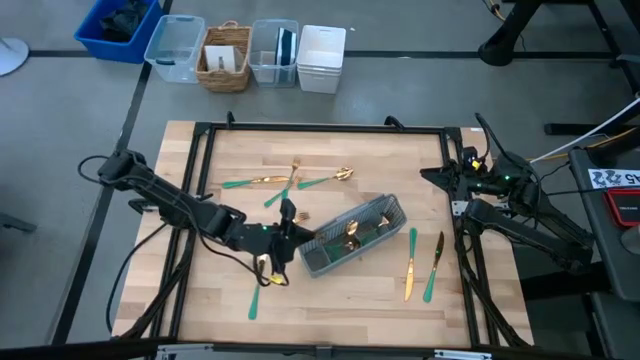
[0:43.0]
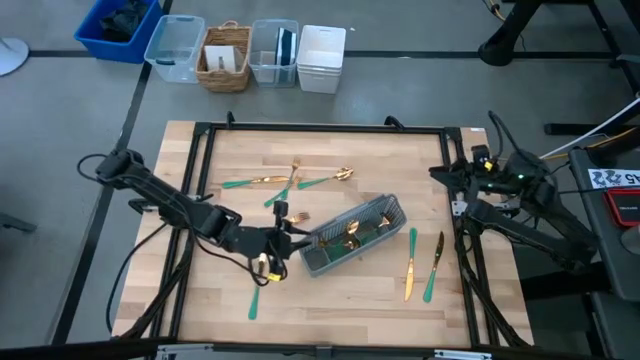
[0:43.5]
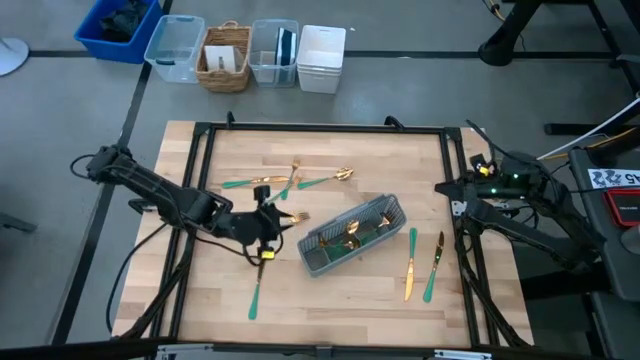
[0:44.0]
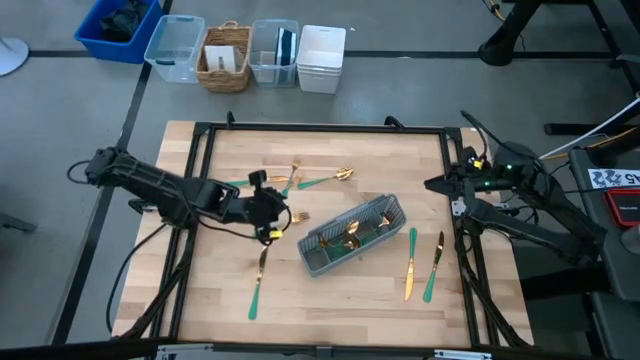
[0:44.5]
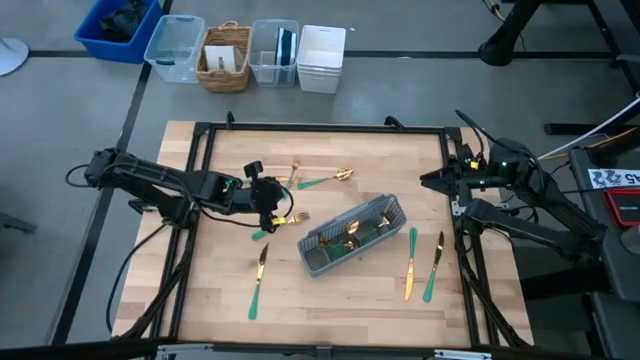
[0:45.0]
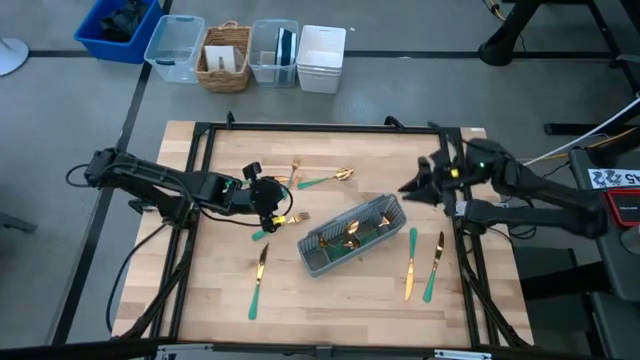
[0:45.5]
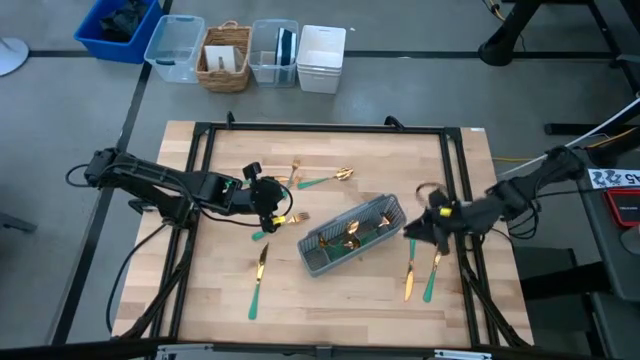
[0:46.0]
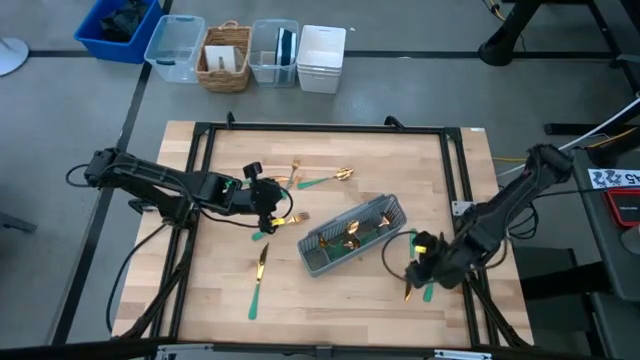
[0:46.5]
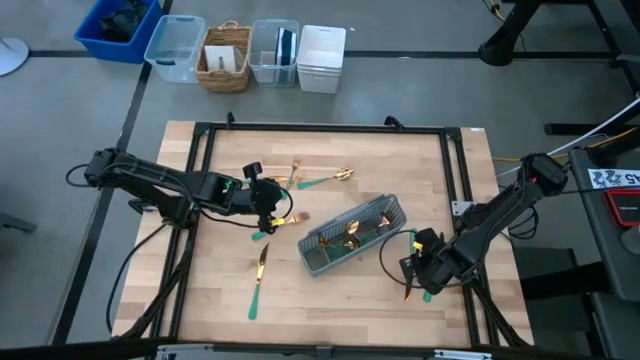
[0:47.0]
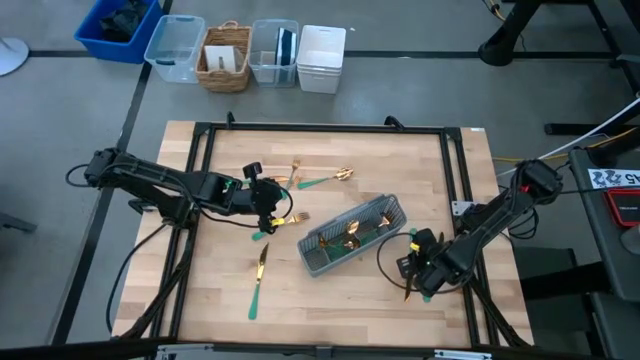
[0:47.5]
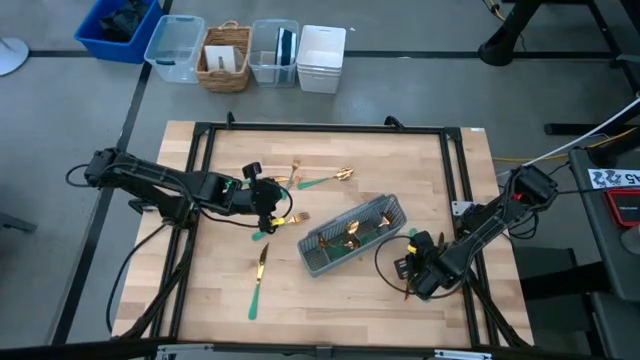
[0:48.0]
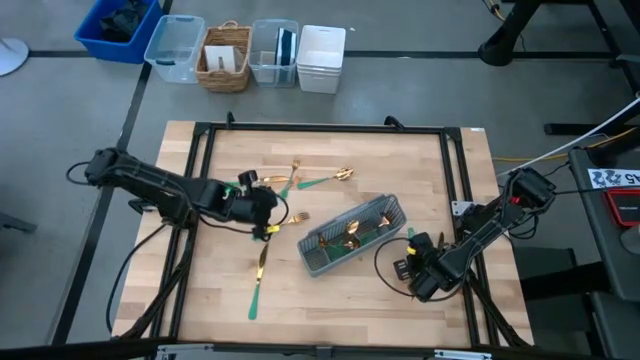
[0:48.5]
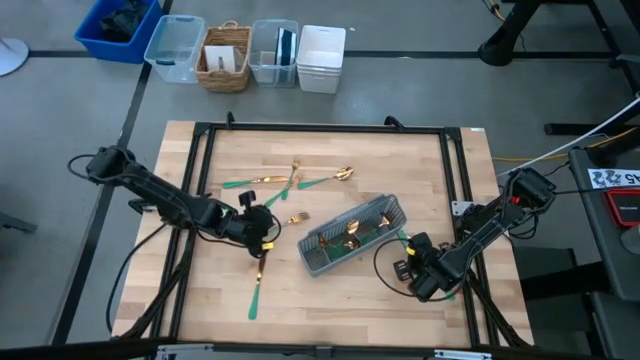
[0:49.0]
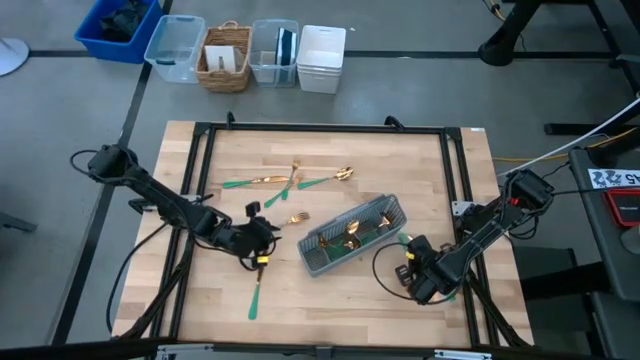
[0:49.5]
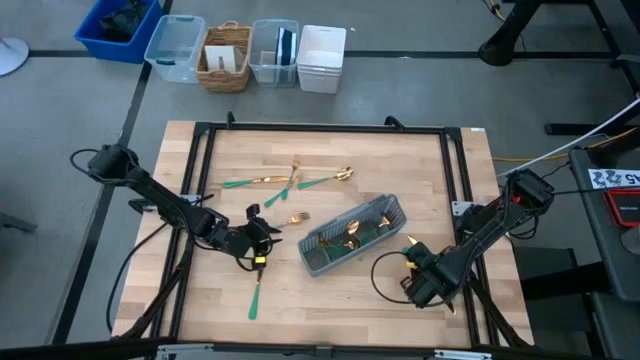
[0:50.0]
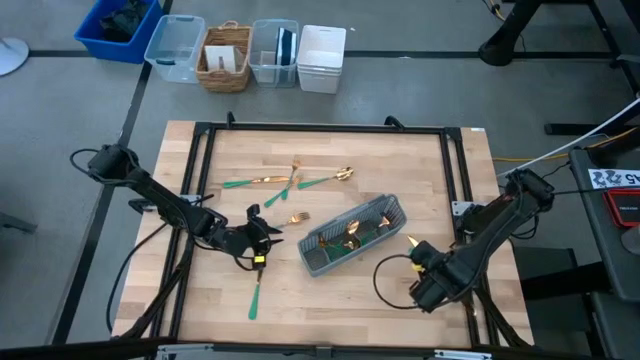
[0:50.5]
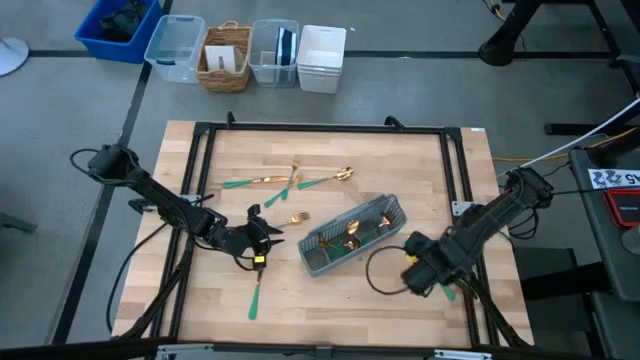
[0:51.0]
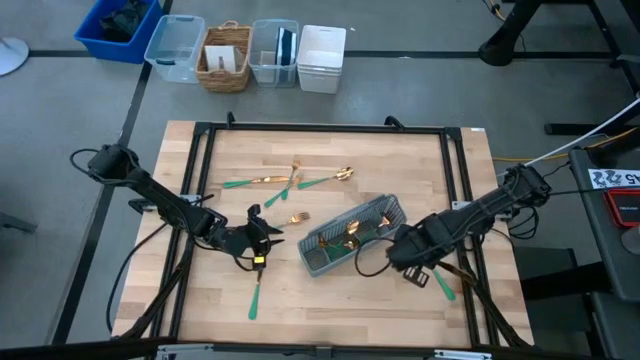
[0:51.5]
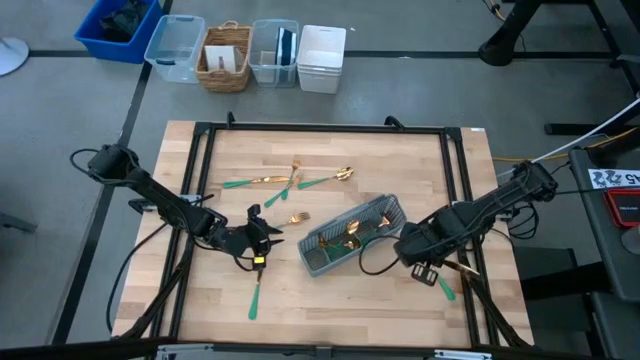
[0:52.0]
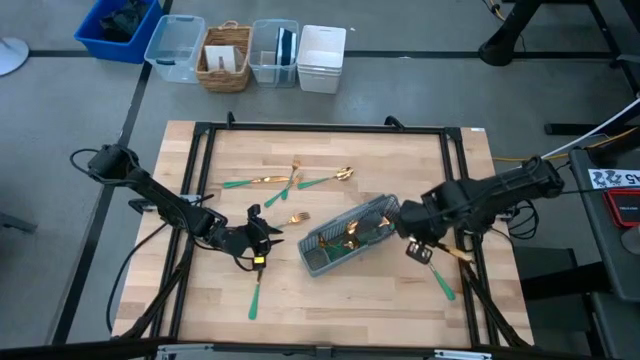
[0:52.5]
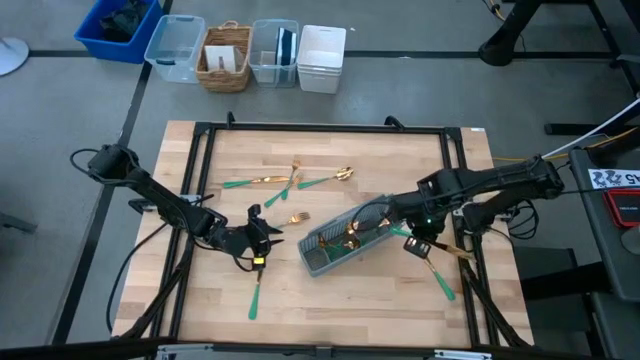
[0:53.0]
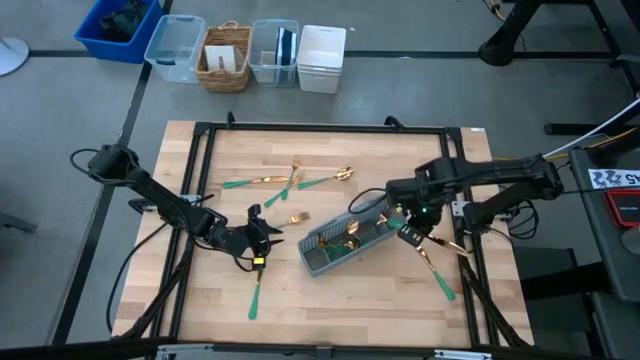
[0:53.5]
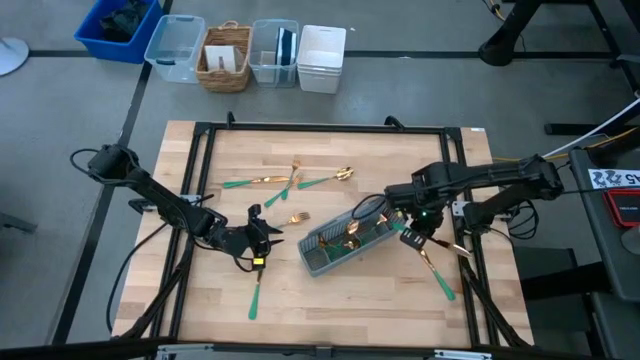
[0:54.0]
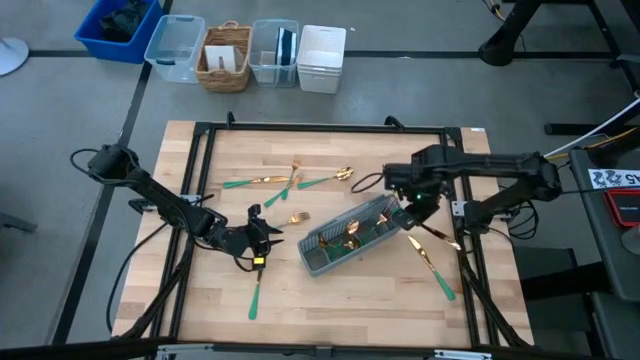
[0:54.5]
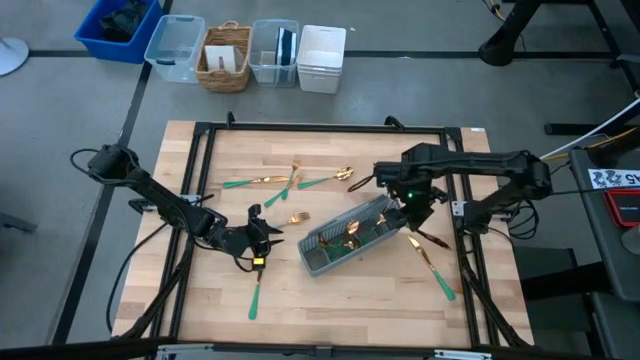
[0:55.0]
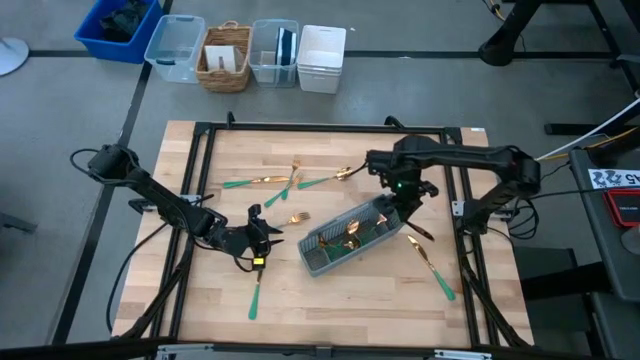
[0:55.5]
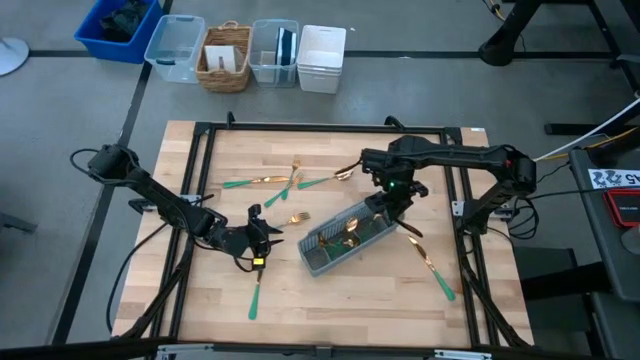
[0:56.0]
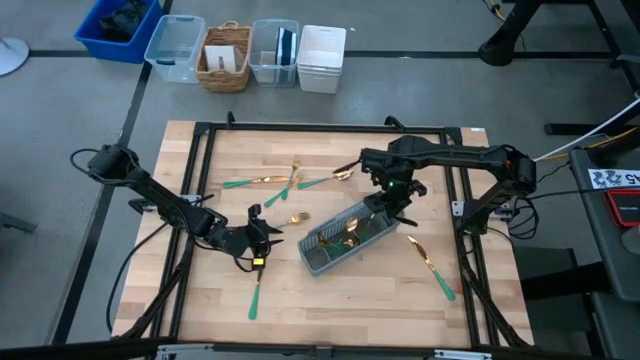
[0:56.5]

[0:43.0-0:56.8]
Task: Sort silverware
Put the gold knife into the gray silverware organizer

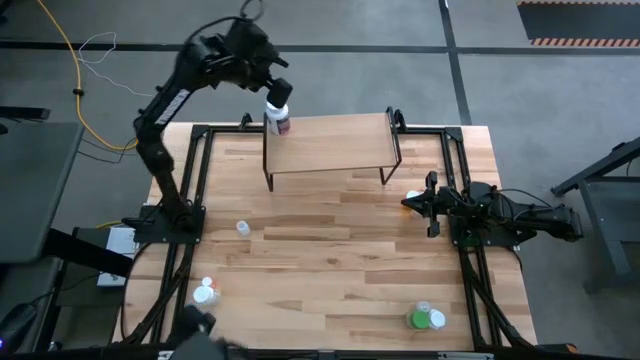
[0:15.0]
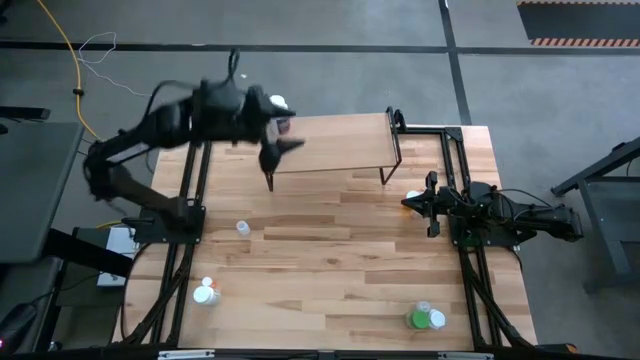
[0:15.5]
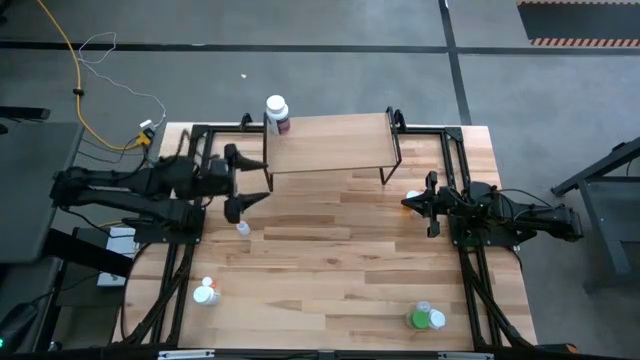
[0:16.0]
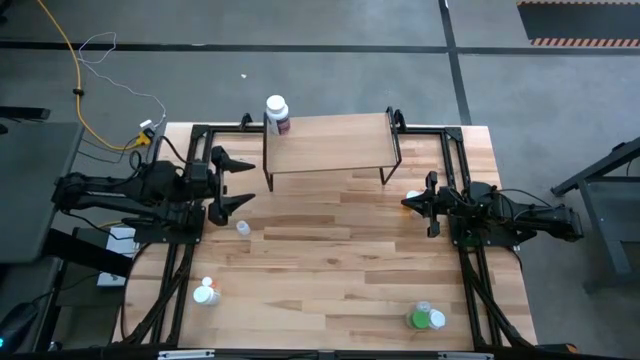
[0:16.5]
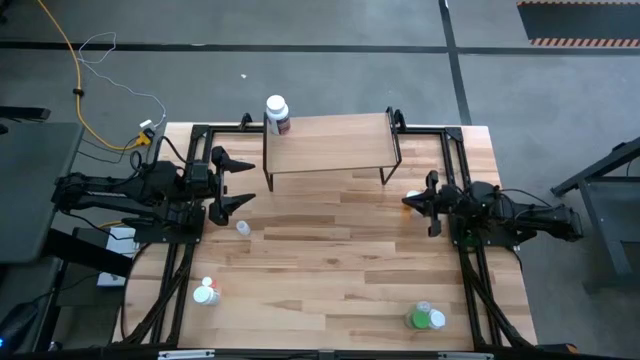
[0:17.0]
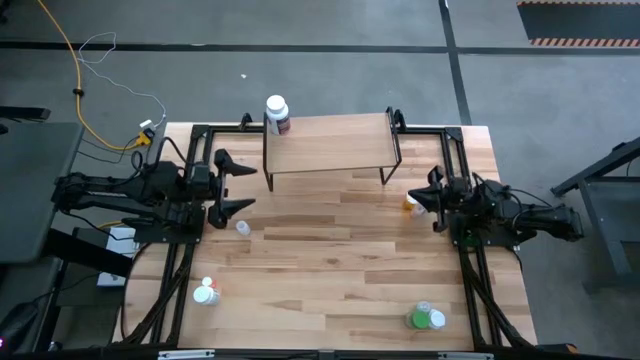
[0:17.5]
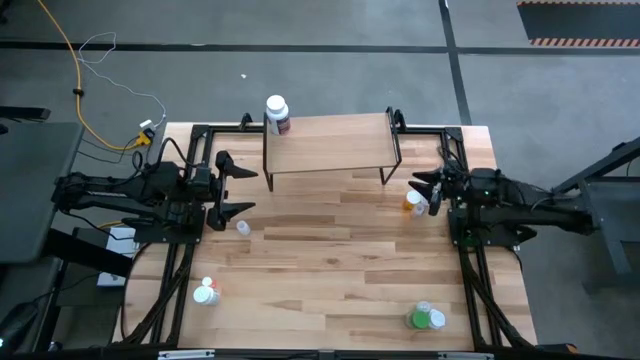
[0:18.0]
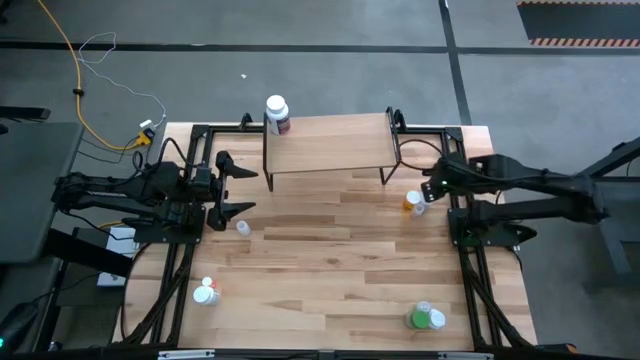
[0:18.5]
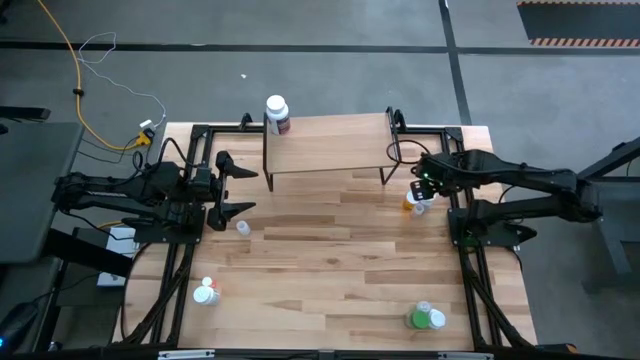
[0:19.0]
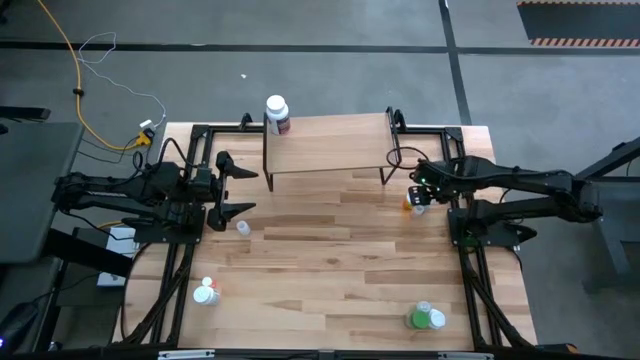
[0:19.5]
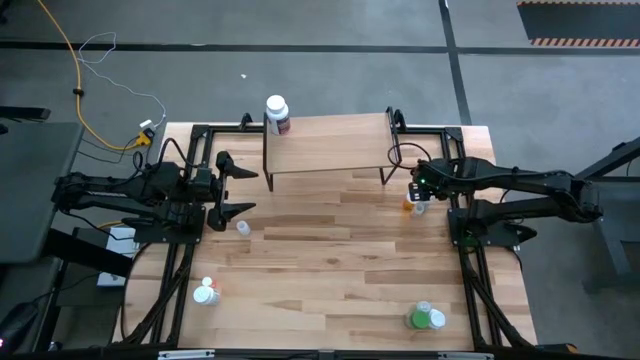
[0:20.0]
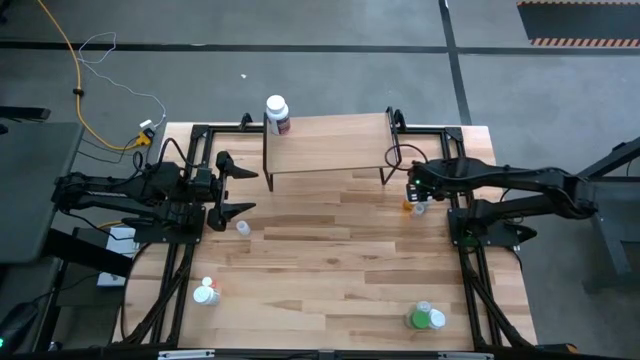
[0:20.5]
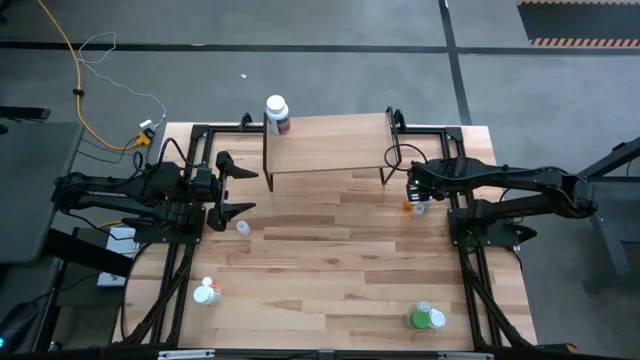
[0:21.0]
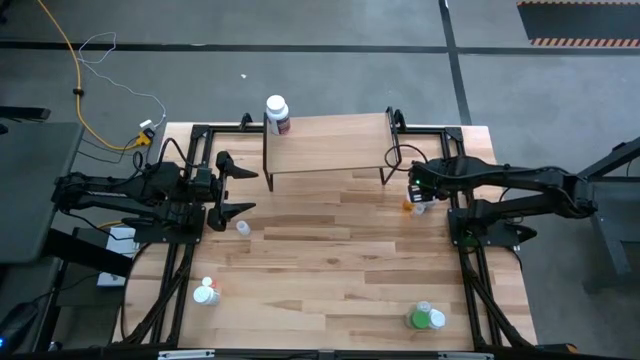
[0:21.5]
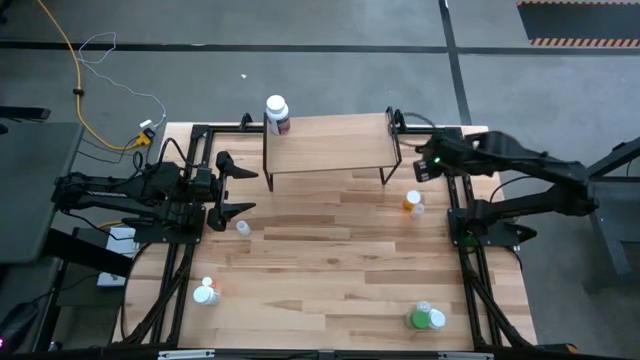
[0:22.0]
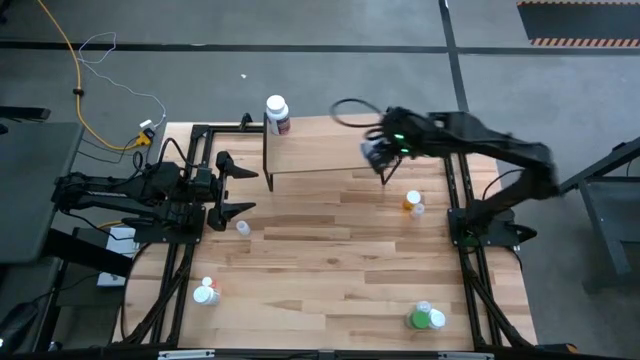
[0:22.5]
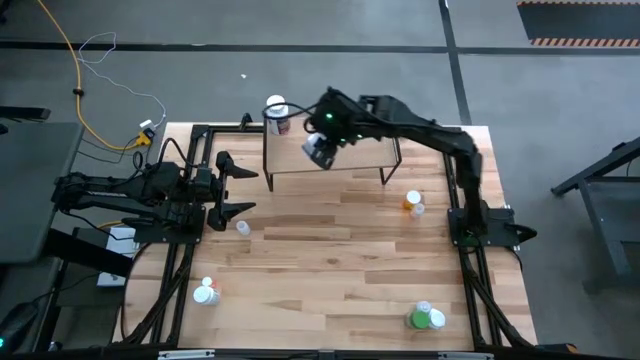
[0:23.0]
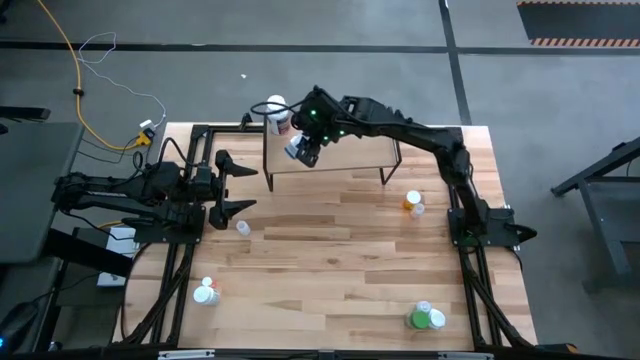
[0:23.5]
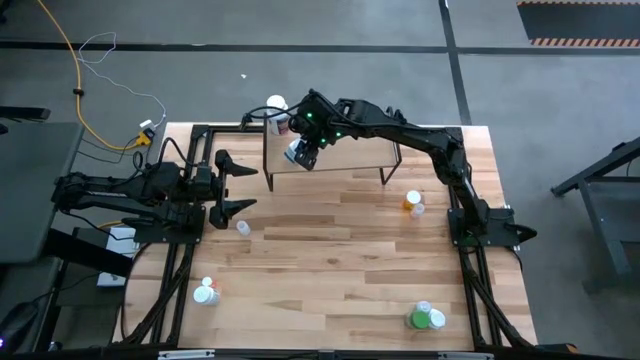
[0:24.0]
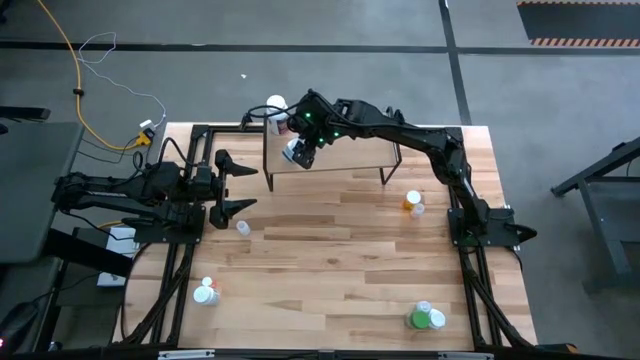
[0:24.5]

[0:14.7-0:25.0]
Task: Pick and place medicine bottles onto shelf by color
Put the top white blue pill bottle on the shelf
